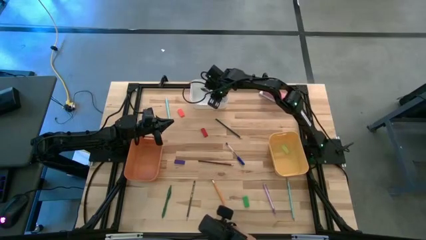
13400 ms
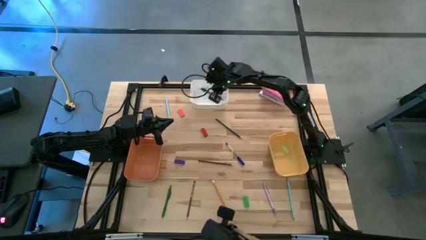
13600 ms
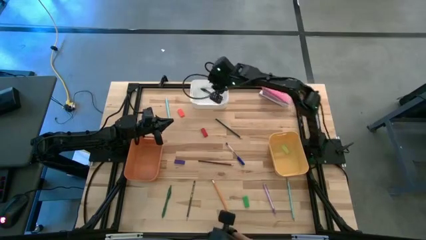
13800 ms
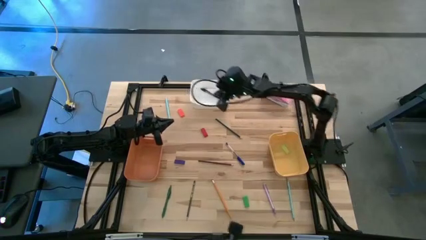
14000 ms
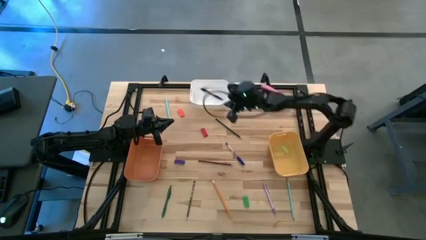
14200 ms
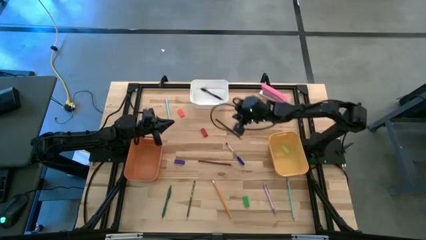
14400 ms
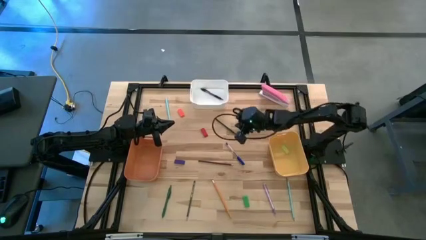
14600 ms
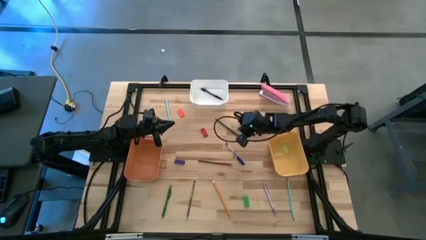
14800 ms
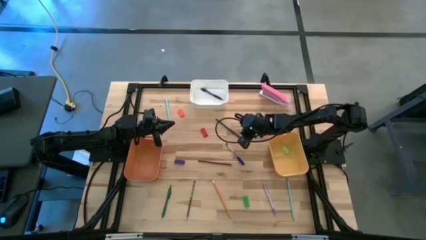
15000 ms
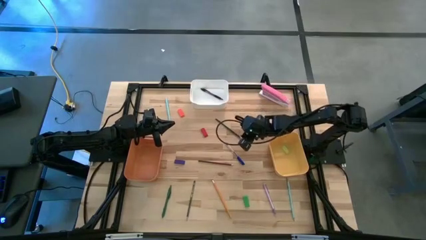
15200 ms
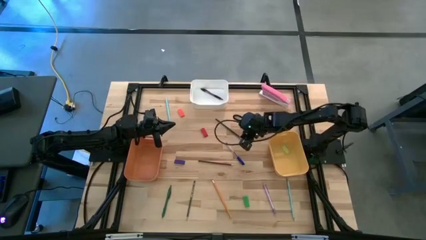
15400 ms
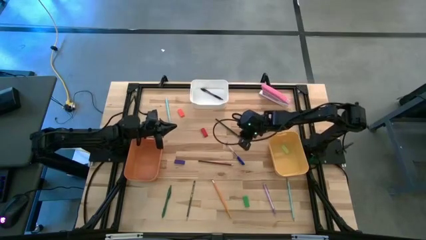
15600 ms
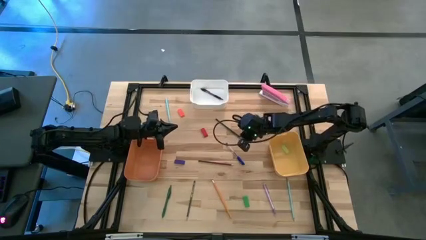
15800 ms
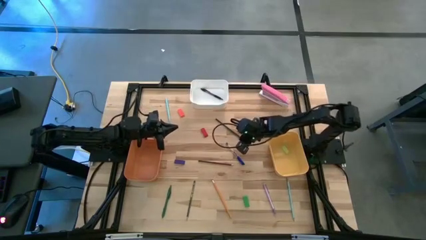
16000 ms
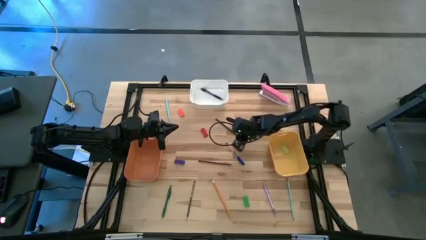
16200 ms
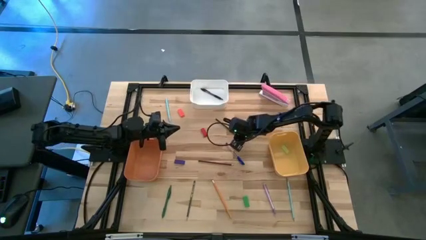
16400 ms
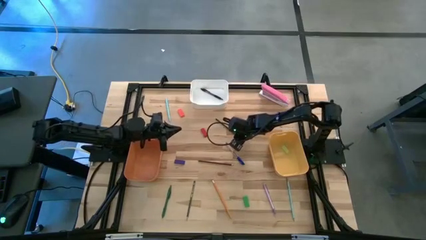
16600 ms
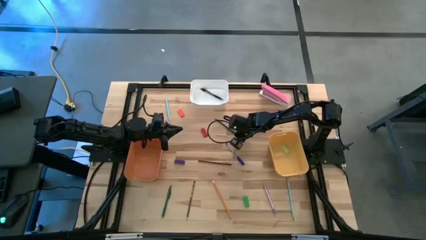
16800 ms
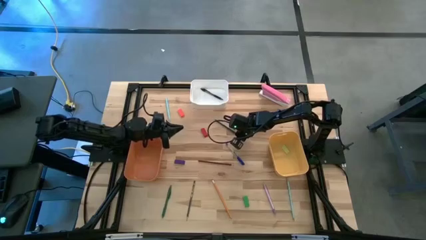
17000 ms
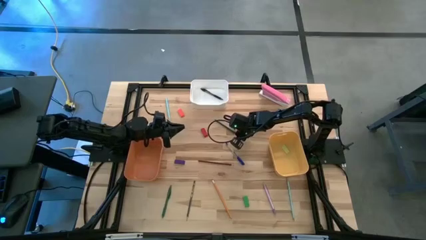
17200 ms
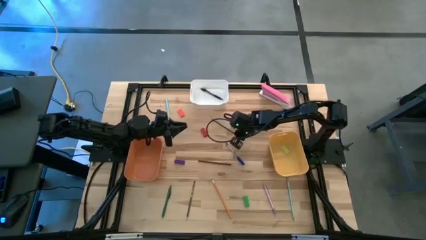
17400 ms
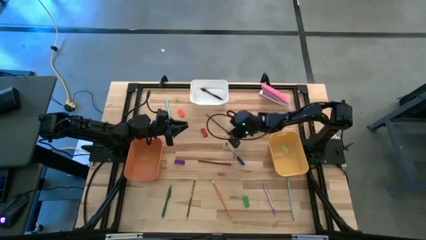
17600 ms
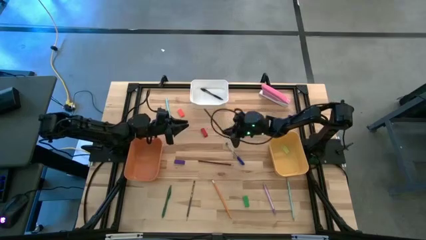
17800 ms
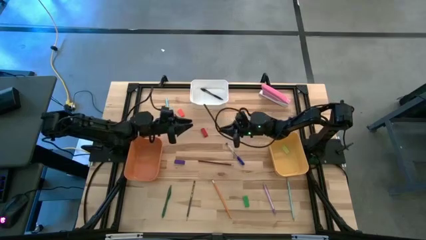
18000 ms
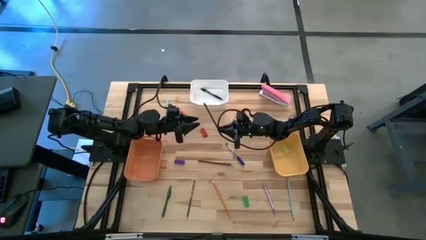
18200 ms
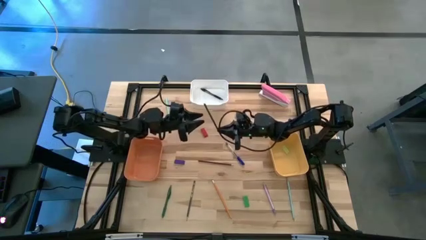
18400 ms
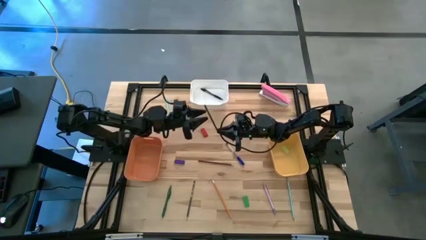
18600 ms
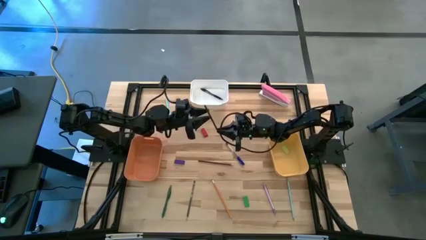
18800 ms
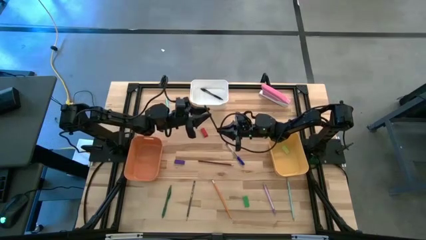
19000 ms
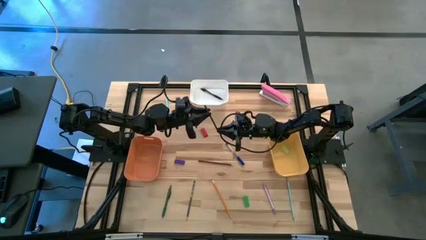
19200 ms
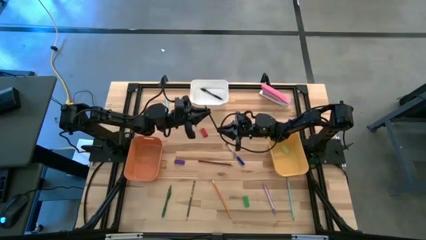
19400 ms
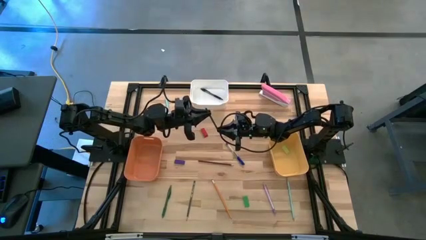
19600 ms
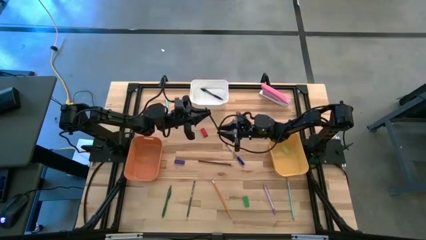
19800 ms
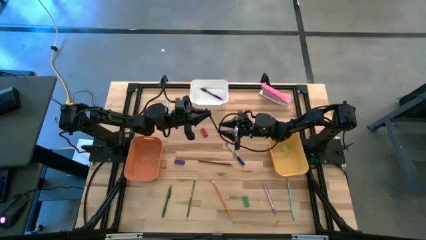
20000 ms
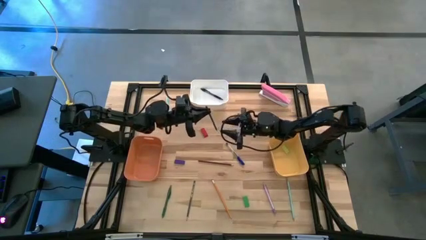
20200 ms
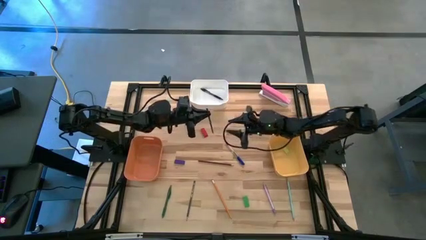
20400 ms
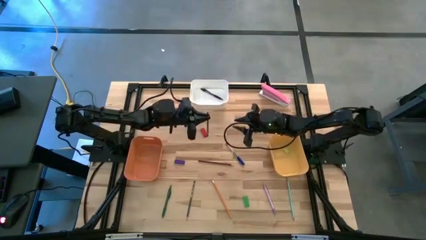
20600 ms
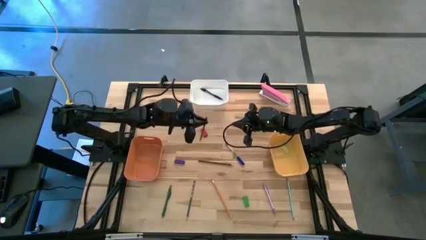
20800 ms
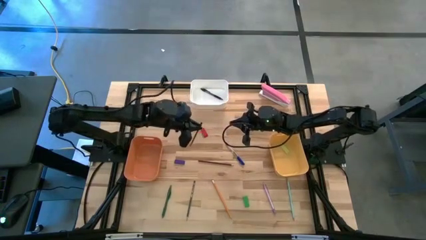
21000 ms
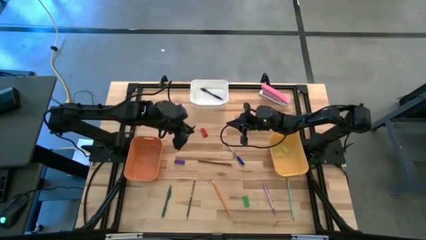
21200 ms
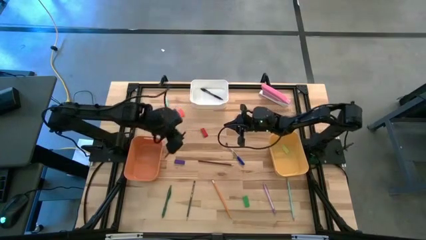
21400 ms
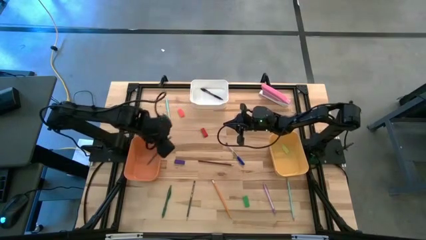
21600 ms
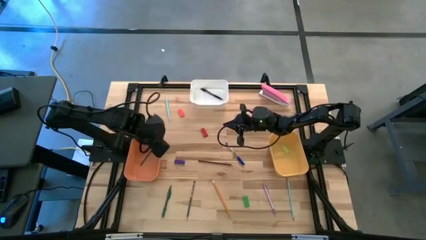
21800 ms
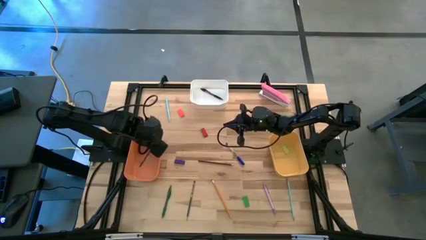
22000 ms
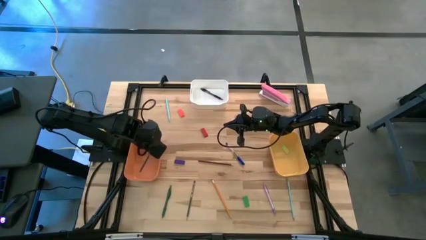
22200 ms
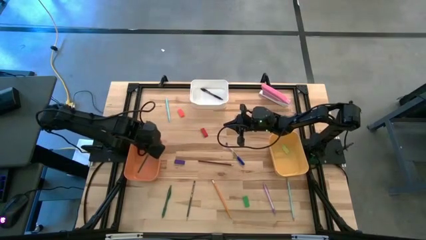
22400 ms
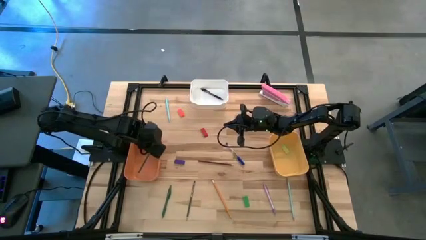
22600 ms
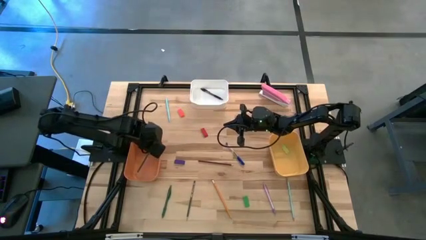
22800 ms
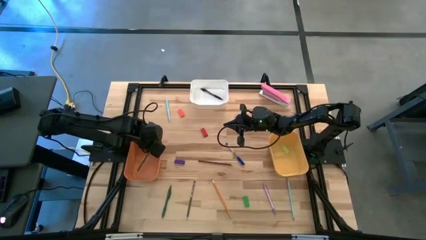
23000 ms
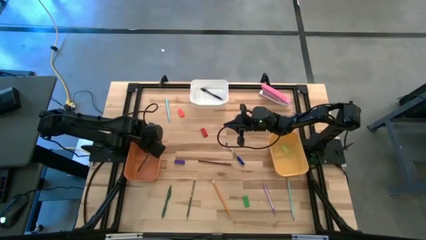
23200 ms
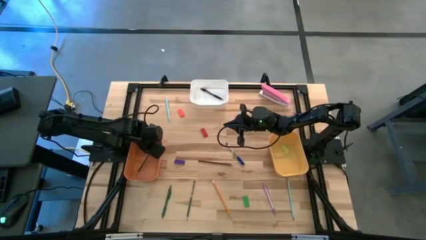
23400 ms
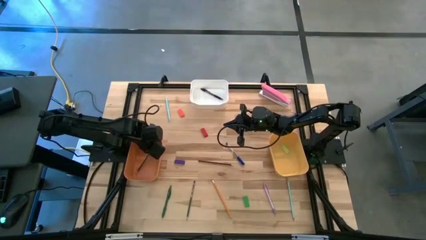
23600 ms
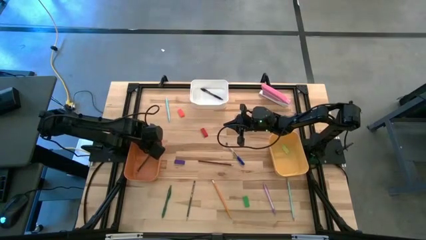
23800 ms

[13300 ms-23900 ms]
Task: Sort crayons/erasers/pens/pencils in bins
Put the dark blue-green pencil into the orange bin

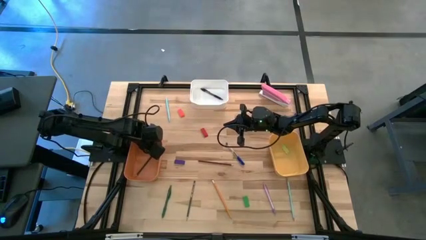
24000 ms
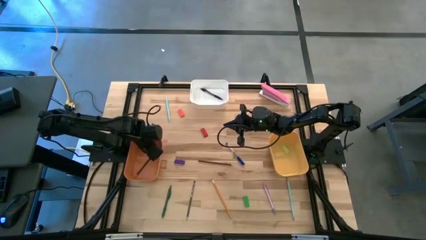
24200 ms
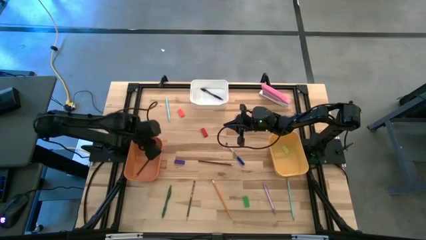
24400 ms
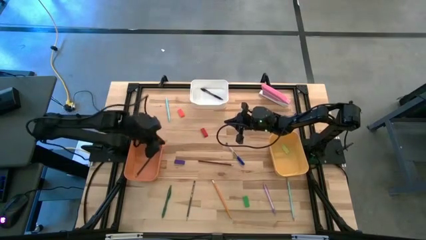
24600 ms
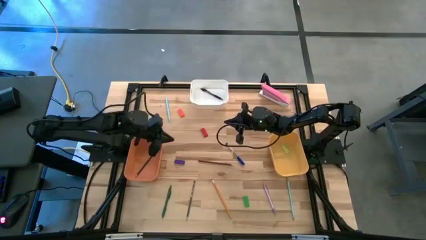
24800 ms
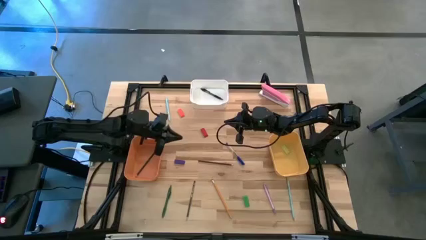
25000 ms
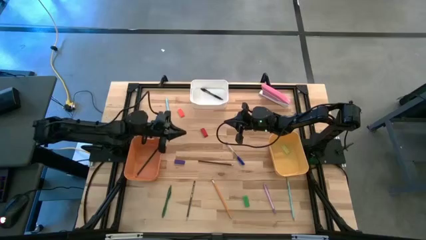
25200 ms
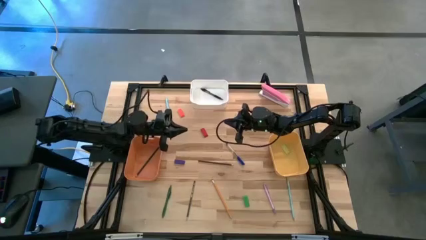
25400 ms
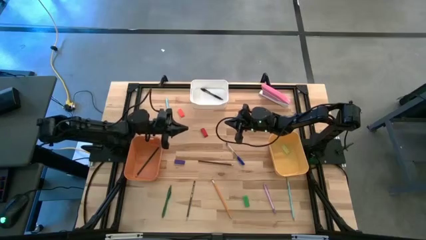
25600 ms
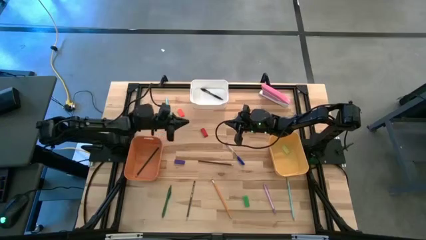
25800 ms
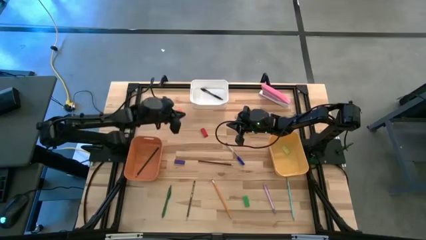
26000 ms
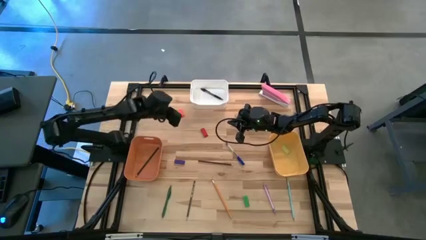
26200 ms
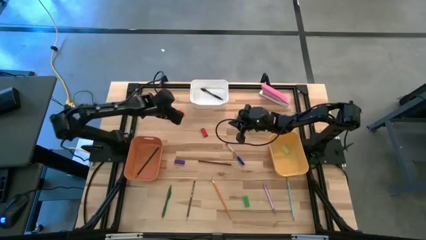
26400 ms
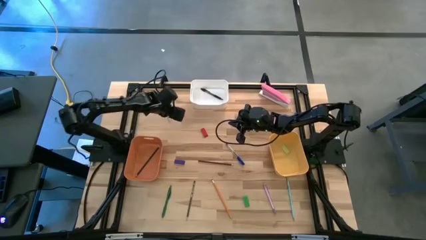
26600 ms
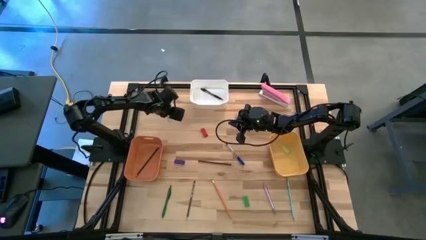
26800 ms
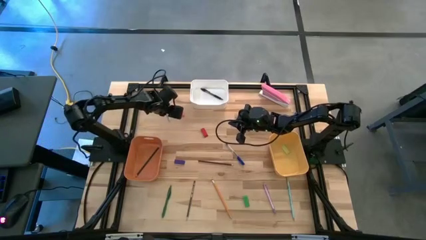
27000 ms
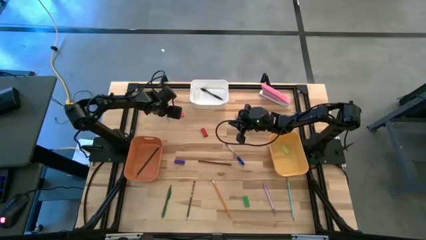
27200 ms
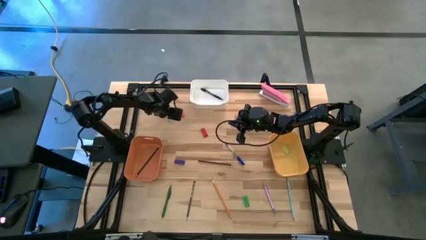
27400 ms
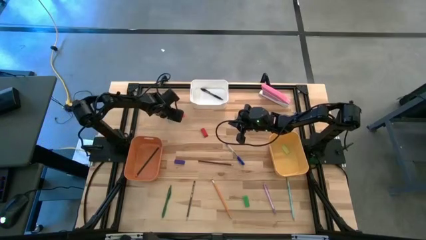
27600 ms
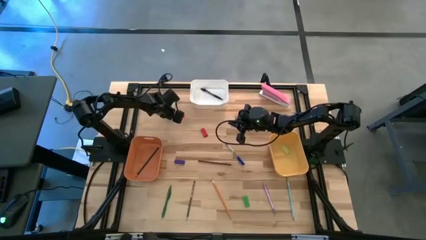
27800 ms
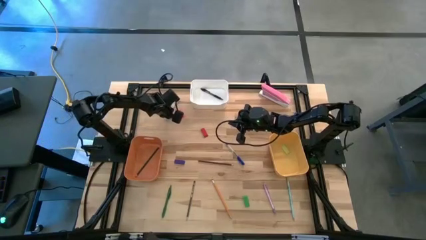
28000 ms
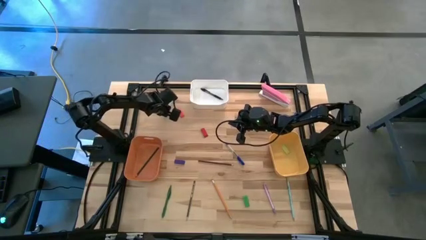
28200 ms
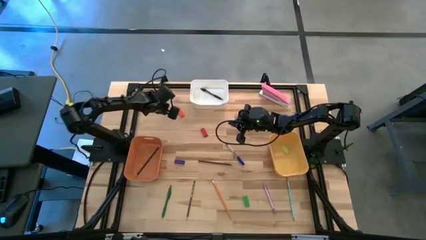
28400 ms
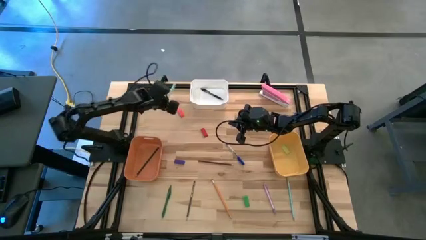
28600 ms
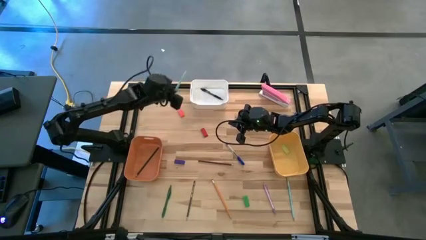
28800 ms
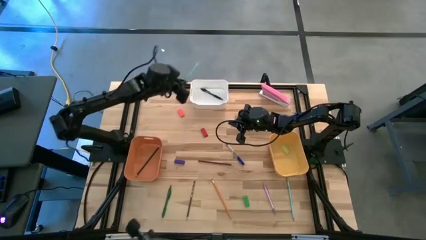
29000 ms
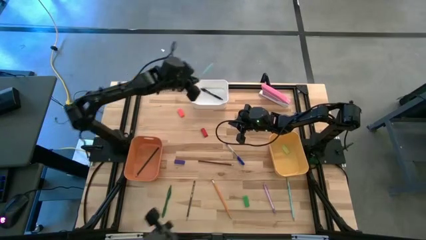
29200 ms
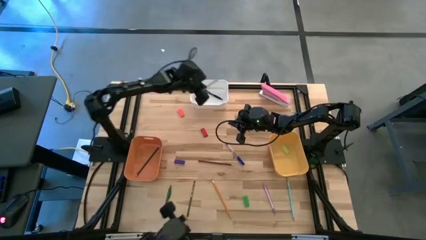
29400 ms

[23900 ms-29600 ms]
Put the light blue pen into the white bin
